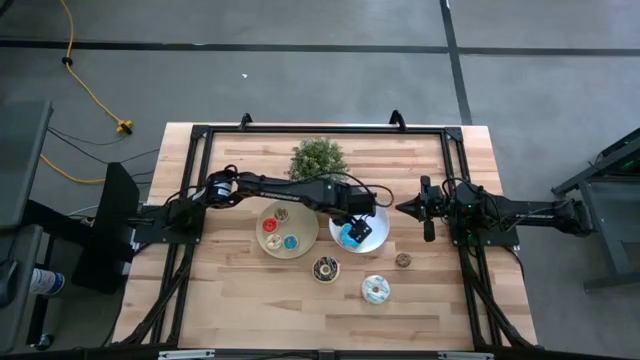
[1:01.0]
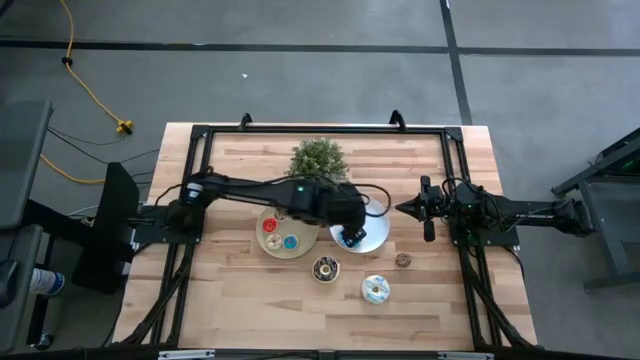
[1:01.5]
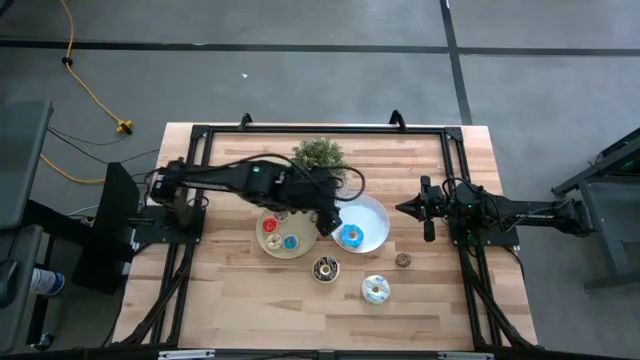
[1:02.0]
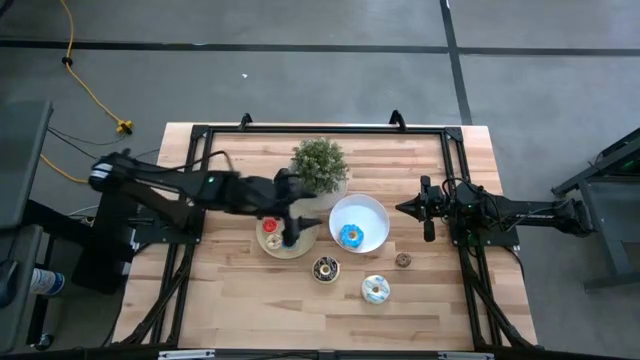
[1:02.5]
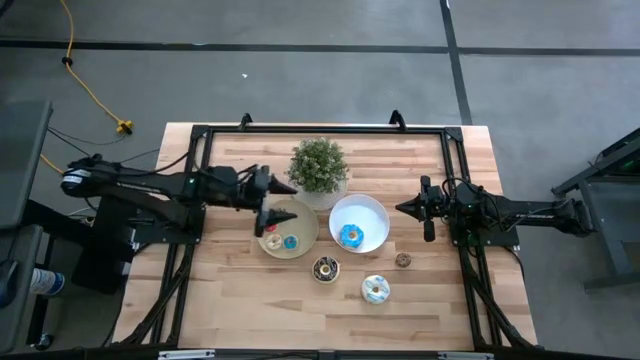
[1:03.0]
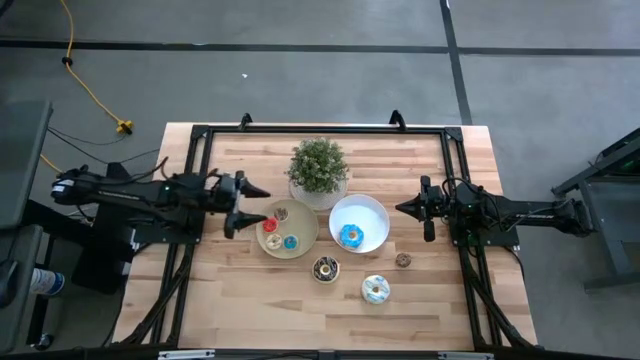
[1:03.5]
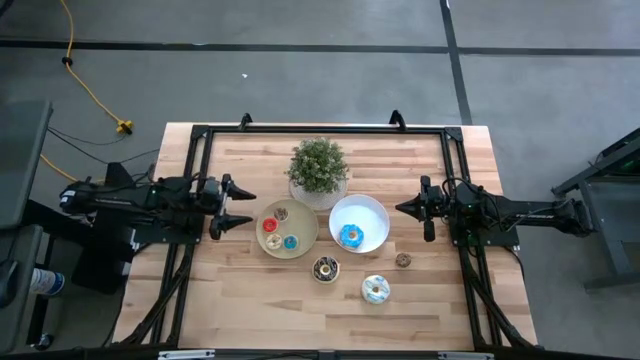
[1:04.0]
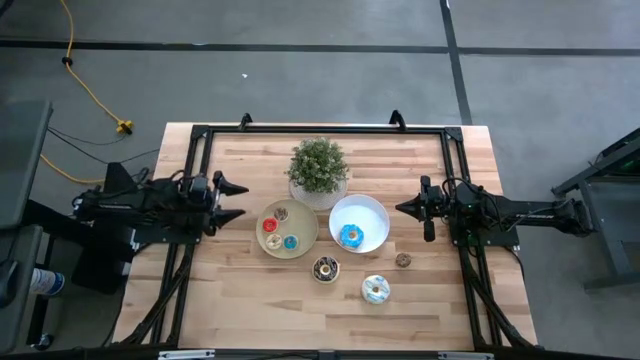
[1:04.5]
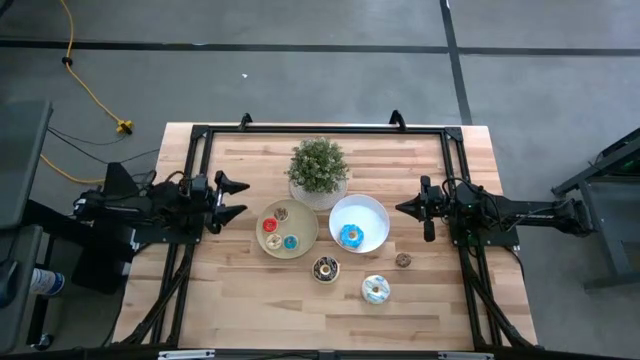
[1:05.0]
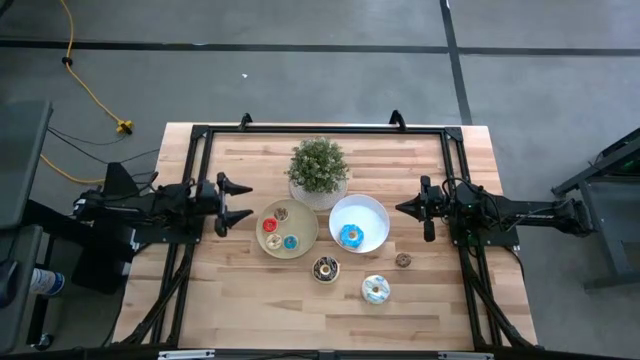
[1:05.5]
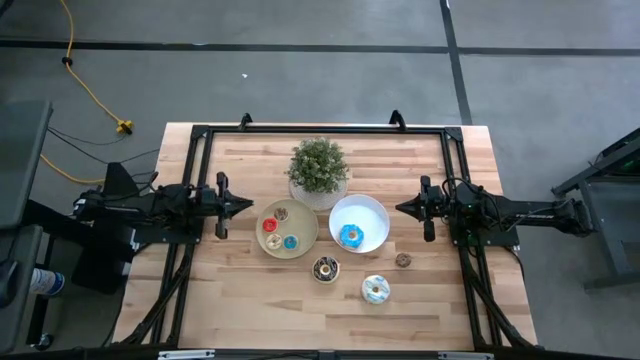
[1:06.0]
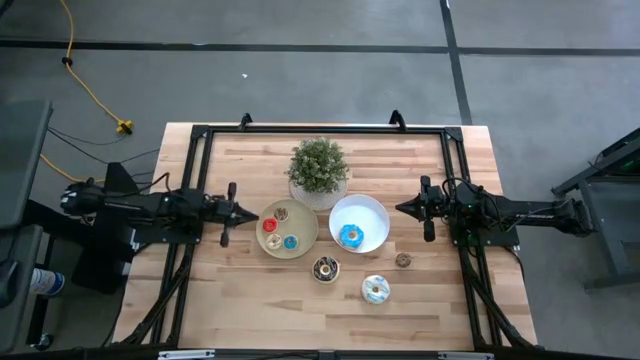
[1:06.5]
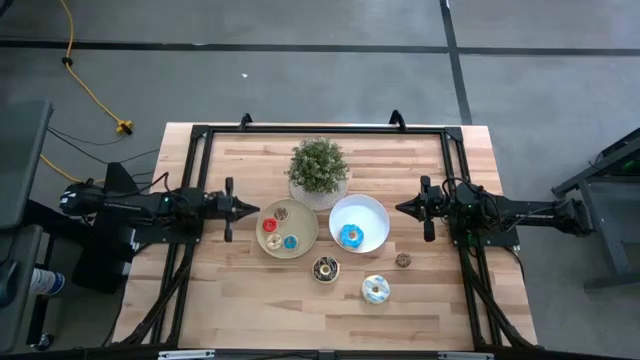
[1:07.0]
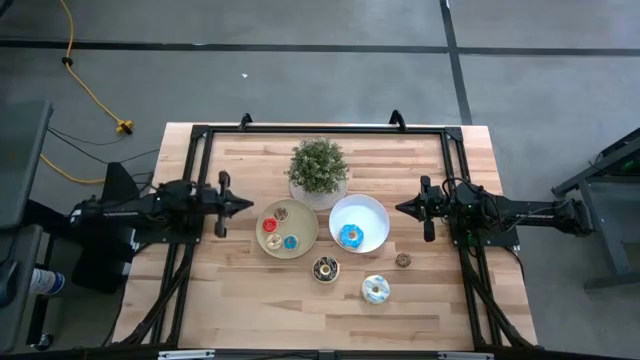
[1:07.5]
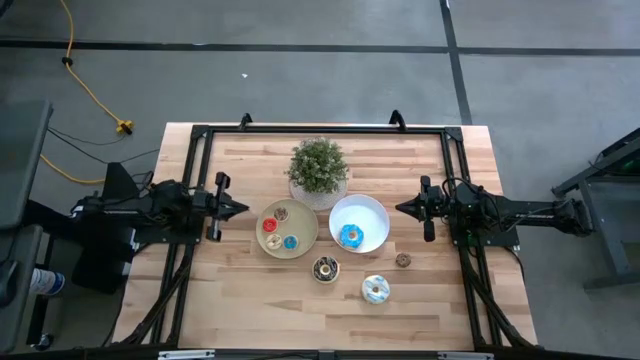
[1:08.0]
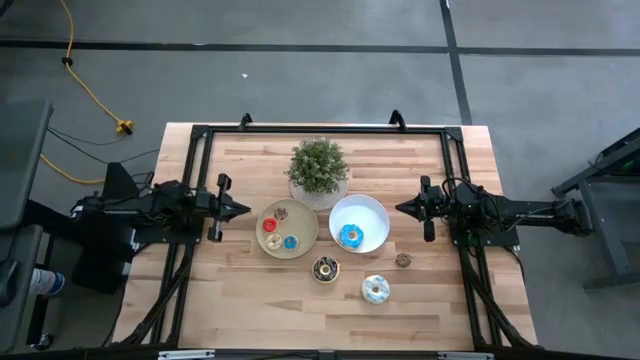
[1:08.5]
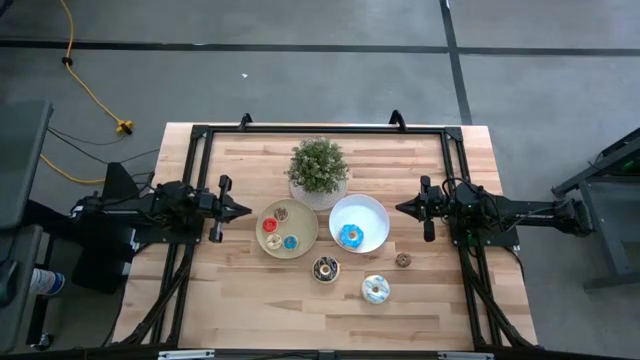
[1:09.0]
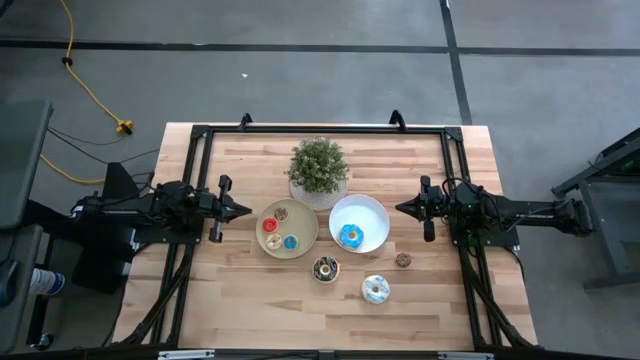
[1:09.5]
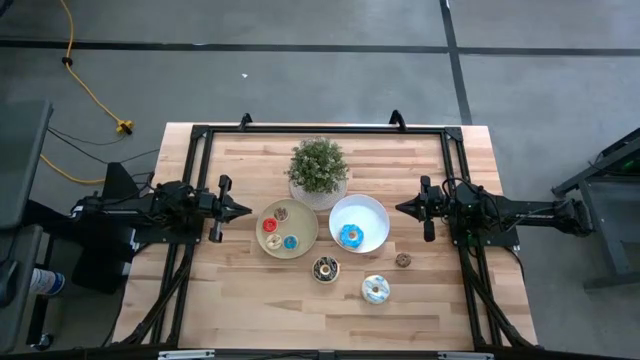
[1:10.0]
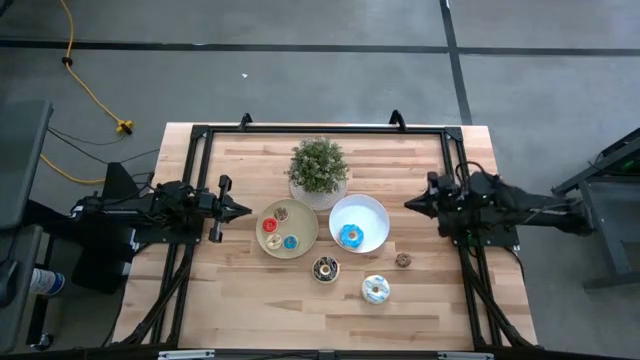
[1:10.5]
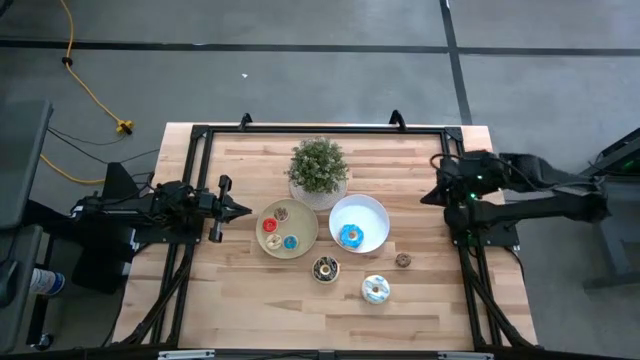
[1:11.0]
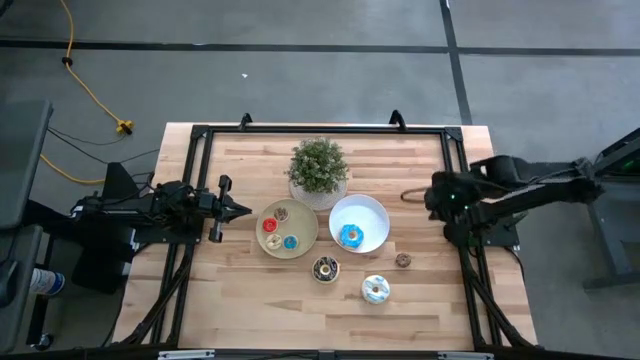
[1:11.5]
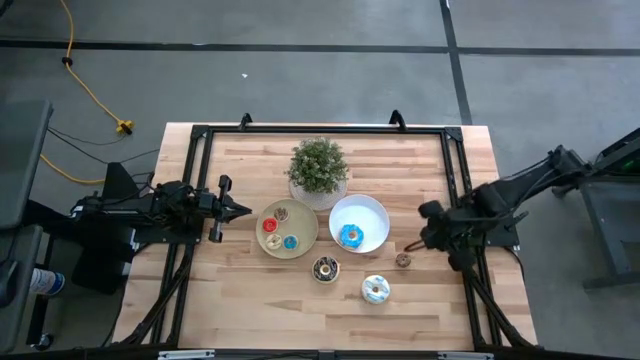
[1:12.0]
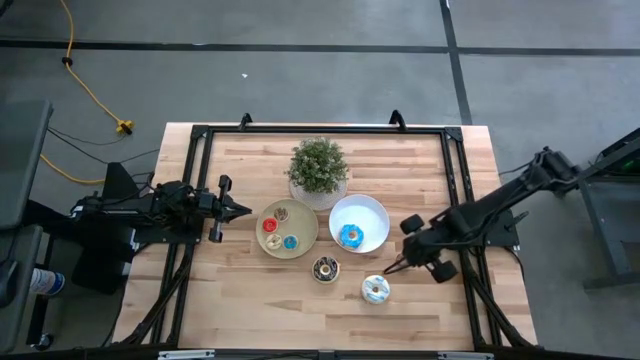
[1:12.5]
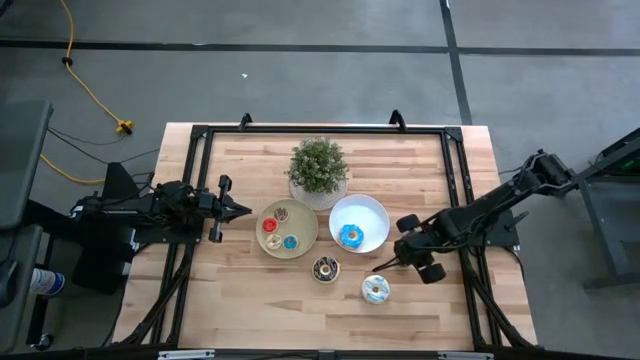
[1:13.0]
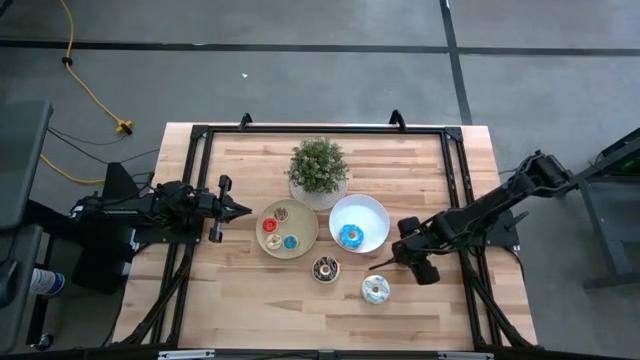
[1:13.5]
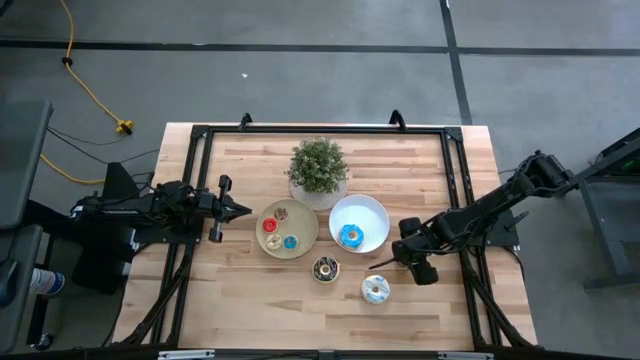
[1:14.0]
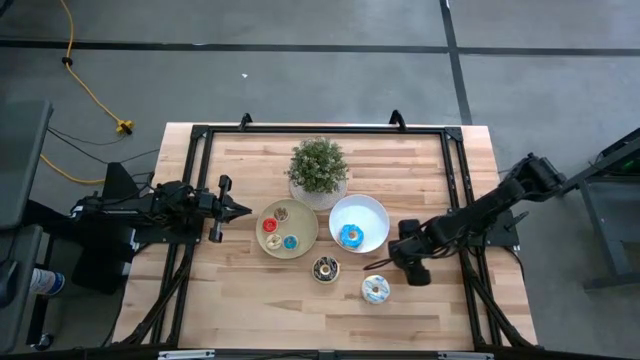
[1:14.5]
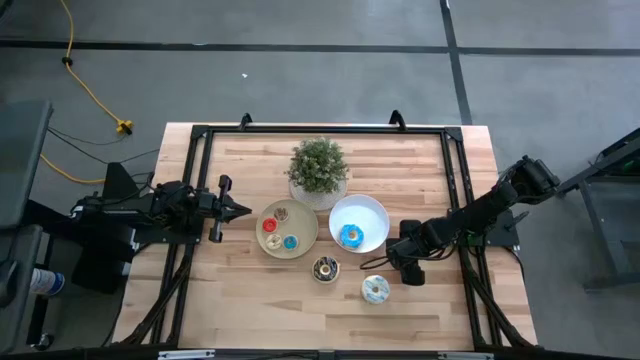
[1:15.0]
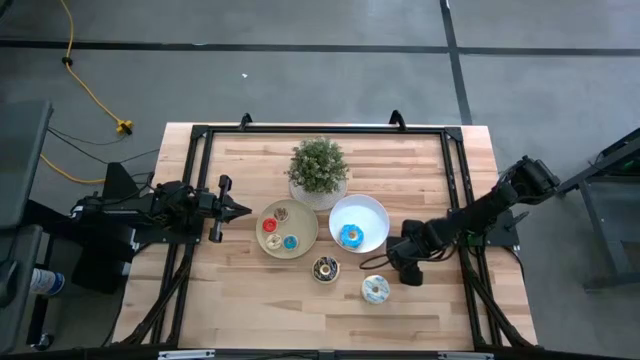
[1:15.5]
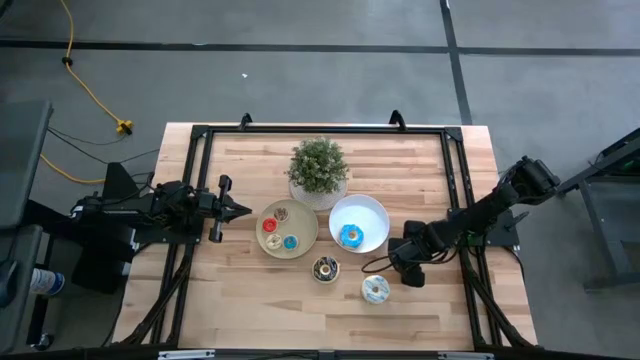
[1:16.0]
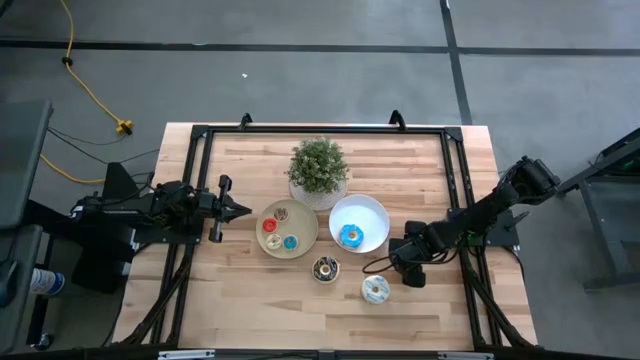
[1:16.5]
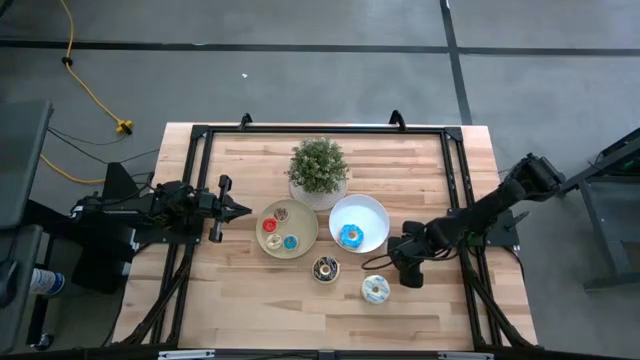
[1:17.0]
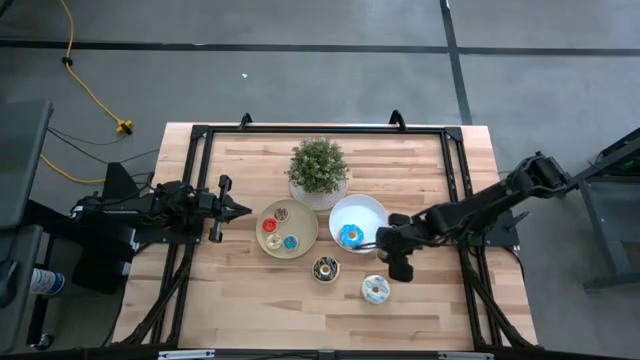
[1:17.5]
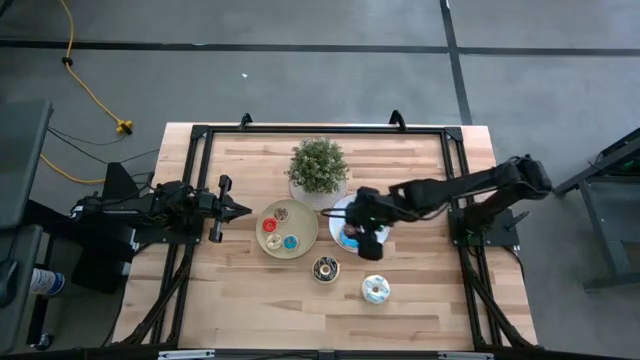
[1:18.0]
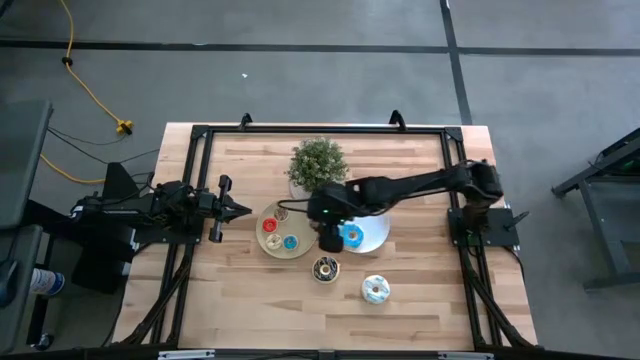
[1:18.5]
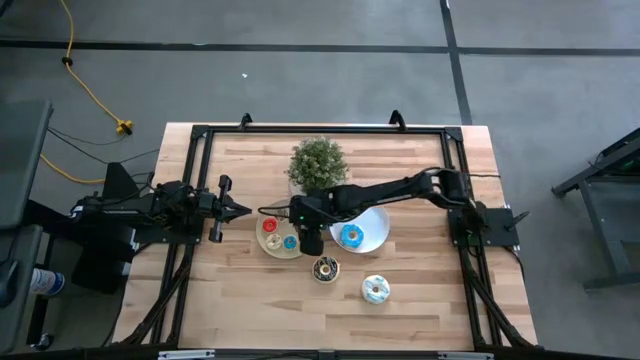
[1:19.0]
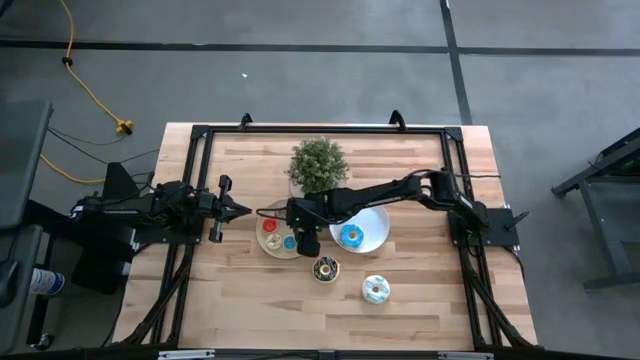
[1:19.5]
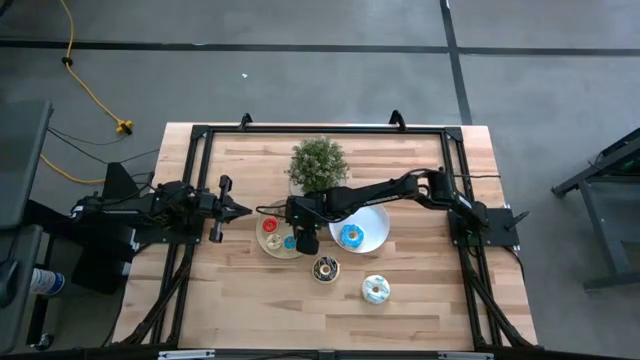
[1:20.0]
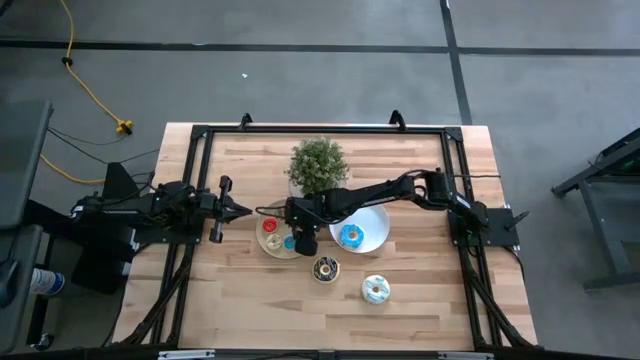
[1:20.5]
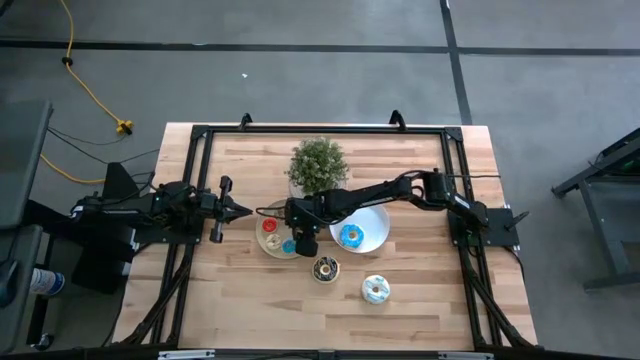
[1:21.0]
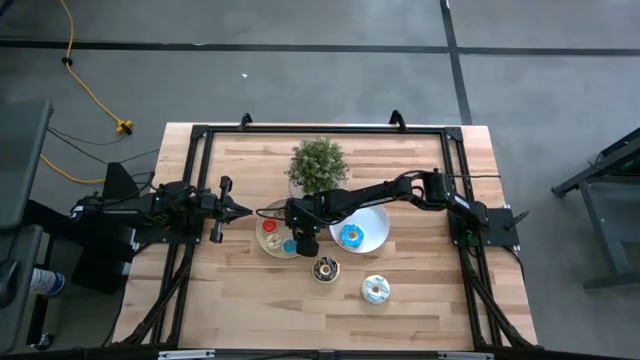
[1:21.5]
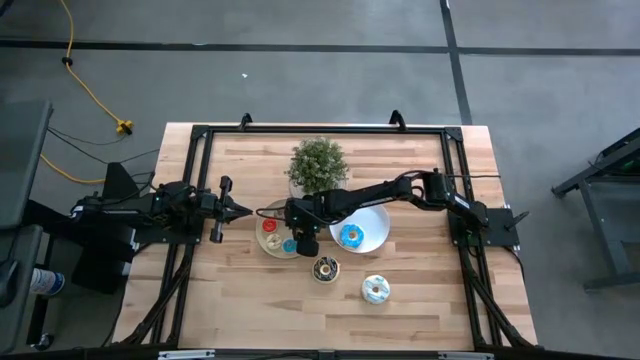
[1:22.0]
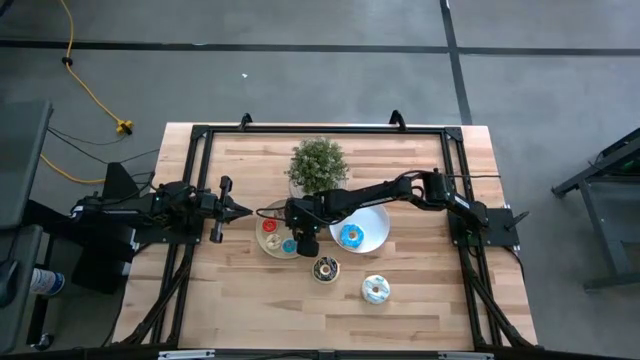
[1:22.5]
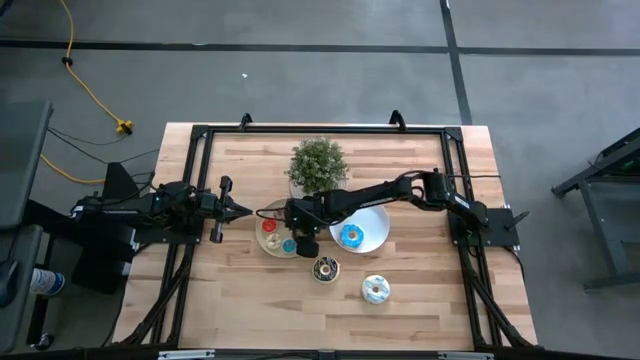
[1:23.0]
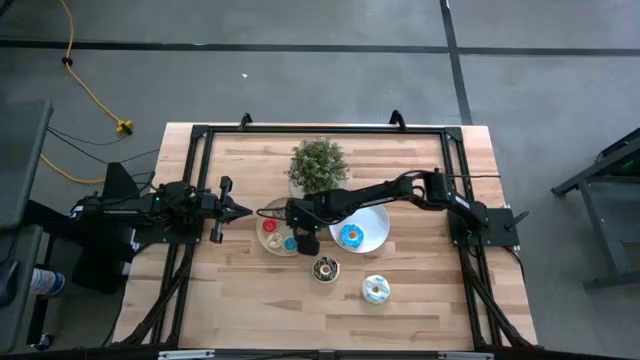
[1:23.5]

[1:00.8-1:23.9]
Task: Pick & Place donuts
Put the small brown donut on the brown plate
